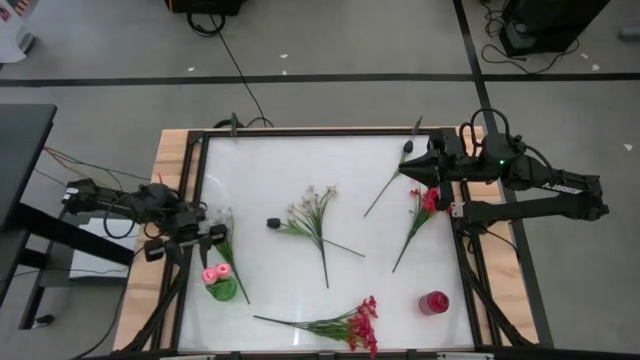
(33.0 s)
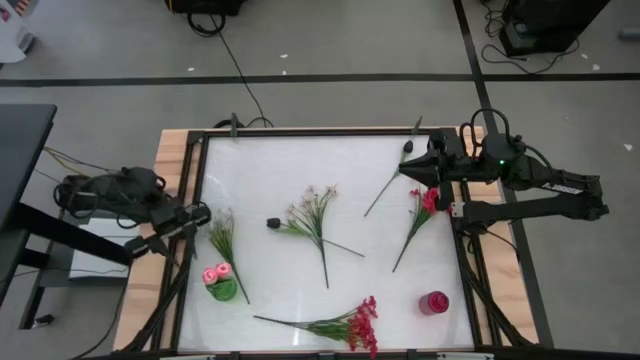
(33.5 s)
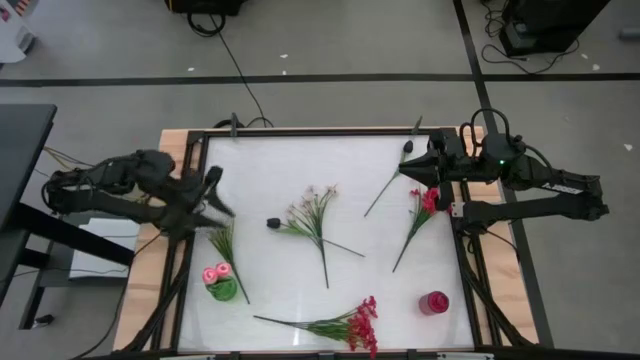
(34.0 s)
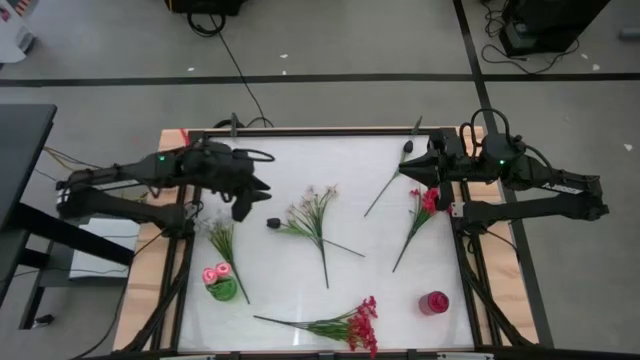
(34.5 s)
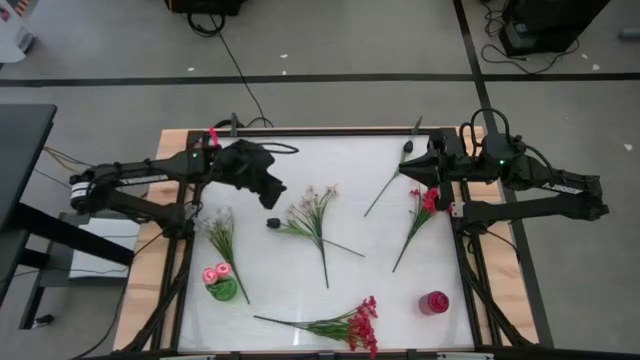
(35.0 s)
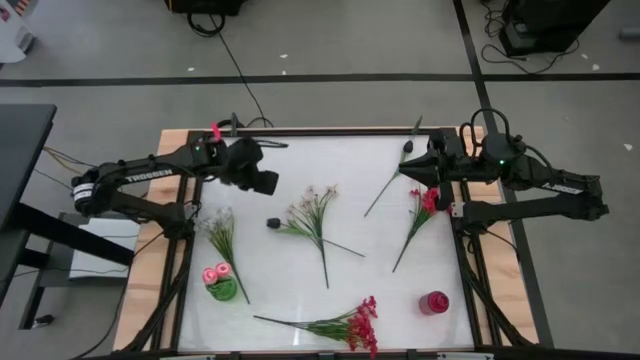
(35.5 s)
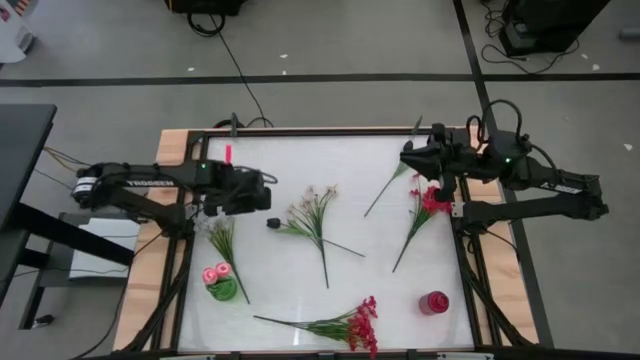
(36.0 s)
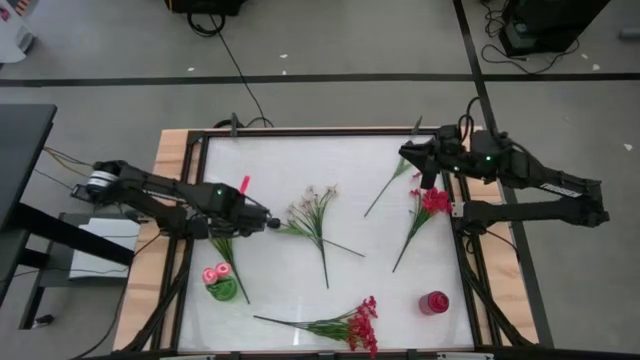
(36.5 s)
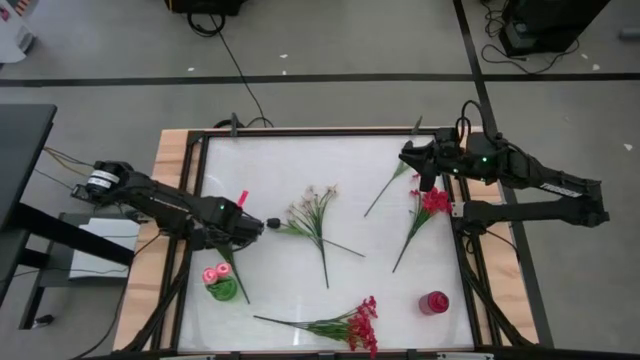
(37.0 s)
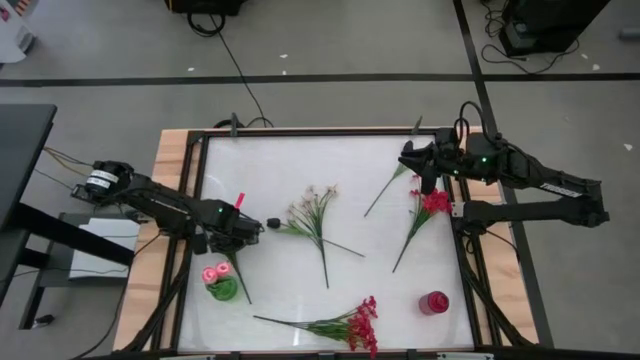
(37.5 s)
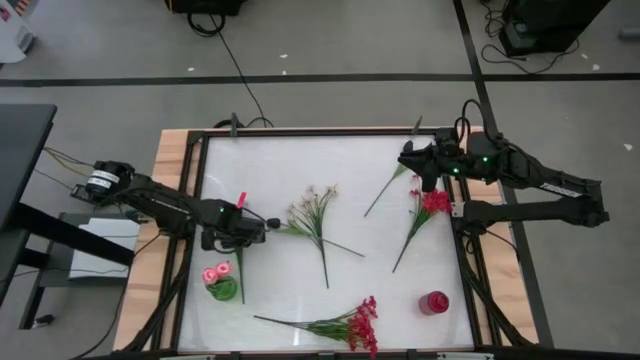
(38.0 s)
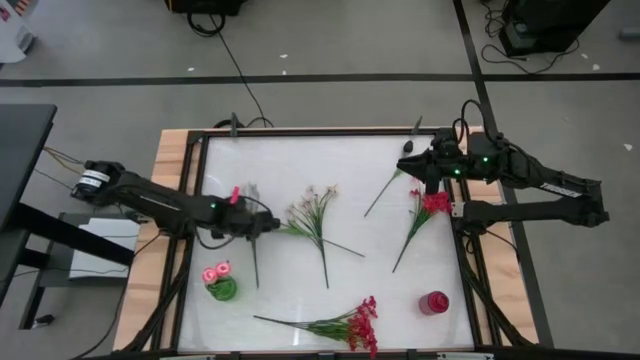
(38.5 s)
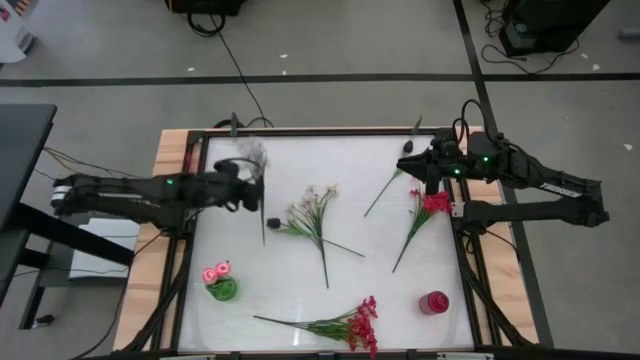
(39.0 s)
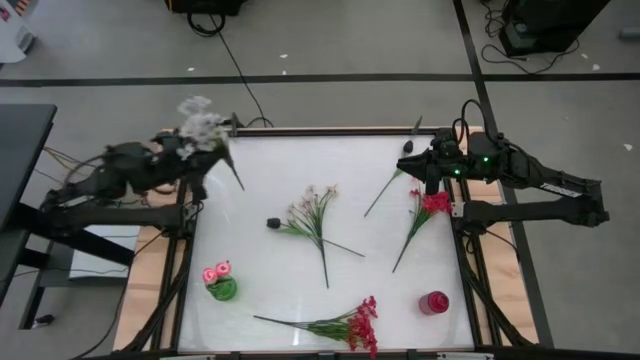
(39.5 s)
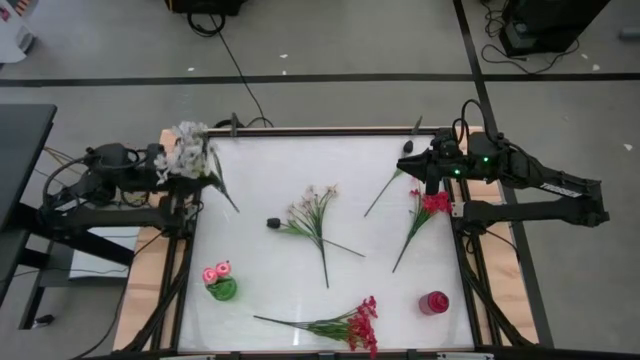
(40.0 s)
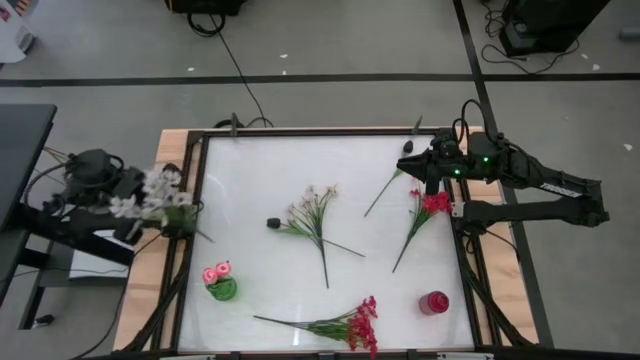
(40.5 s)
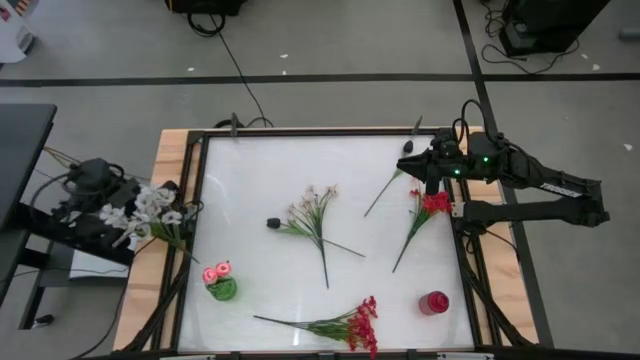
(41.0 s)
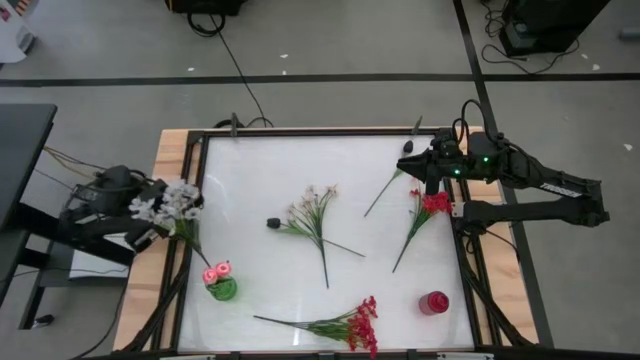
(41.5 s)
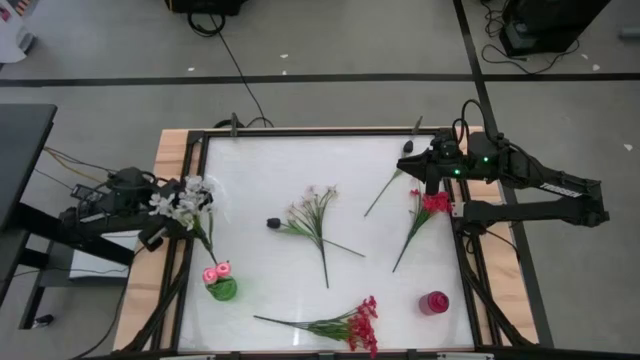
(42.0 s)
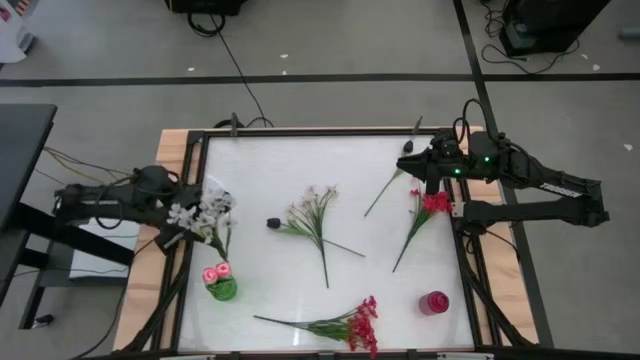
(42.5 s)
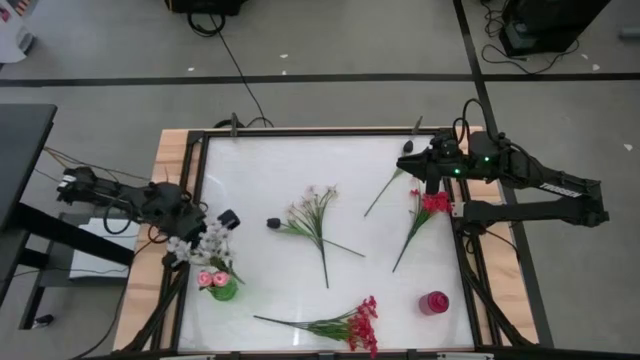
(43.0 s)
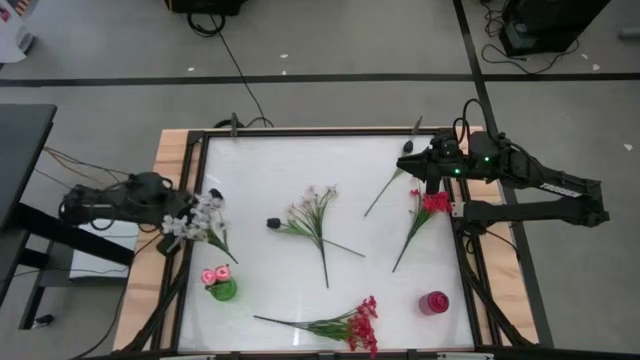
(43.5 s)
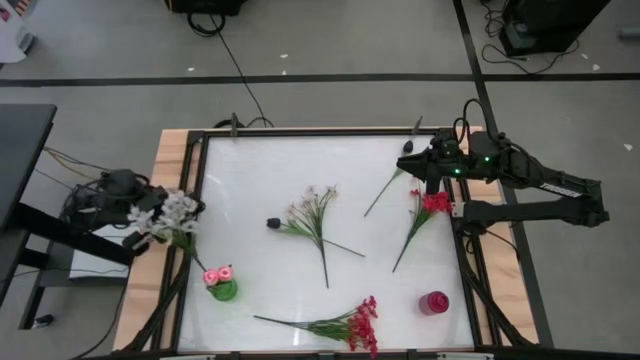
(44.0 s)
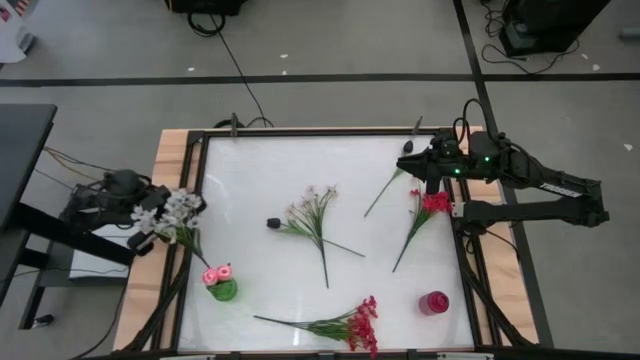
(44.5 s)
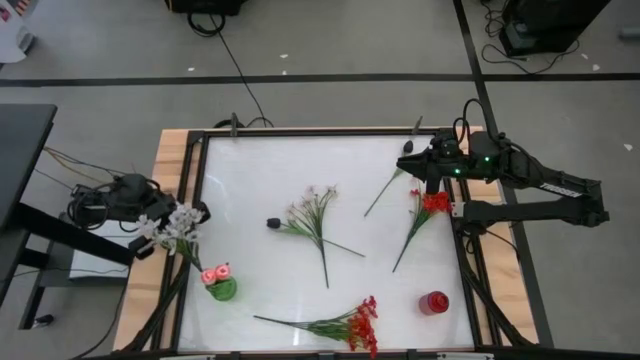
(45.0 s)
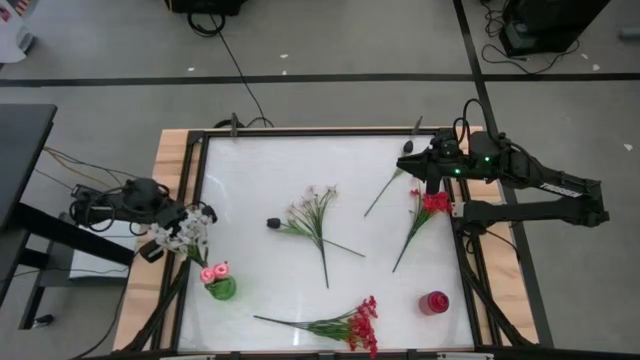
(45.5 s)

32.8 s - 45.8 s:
Task: Sort flowers into vase by color
Put the left white flowers into the green vase

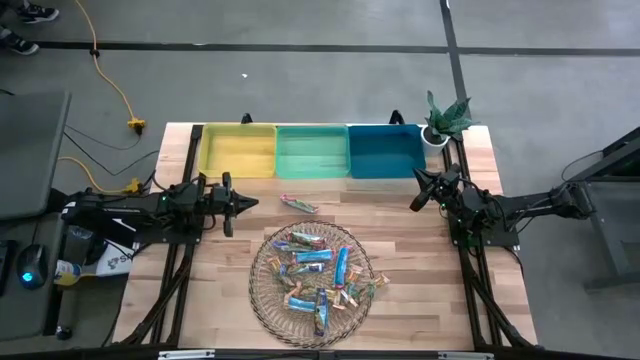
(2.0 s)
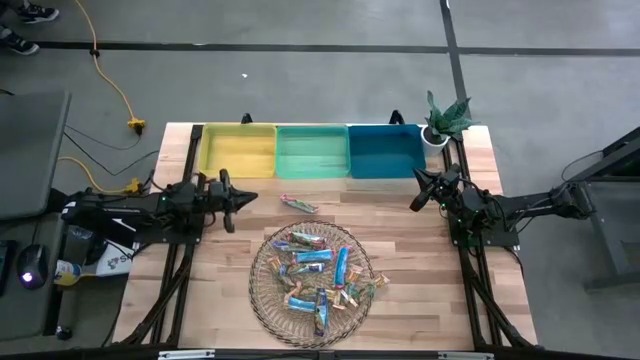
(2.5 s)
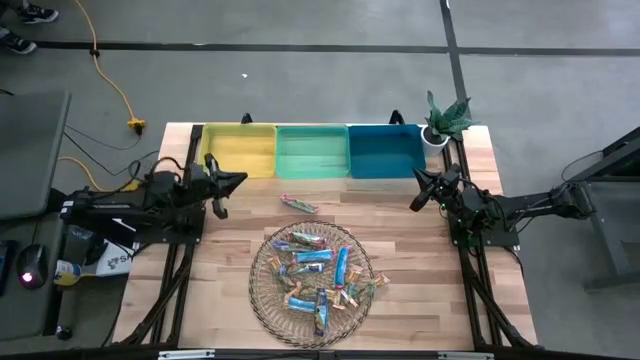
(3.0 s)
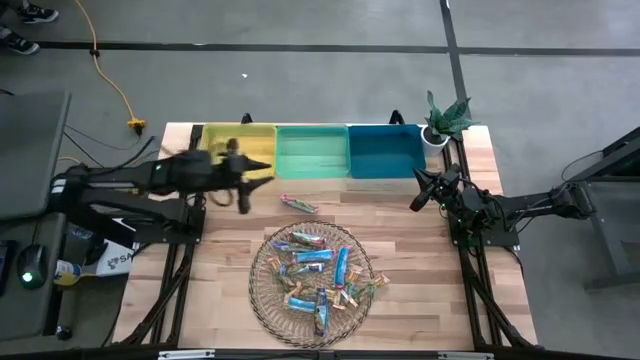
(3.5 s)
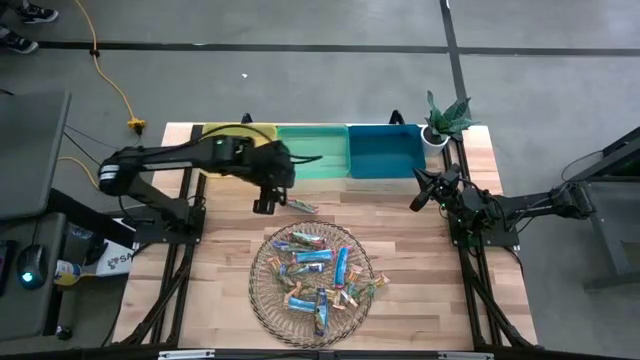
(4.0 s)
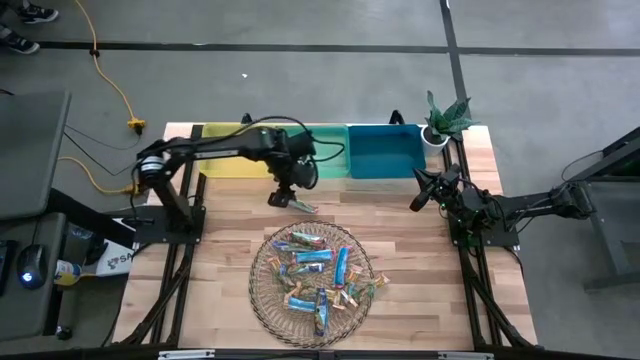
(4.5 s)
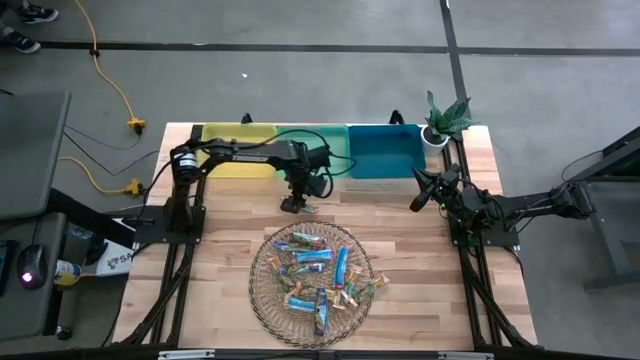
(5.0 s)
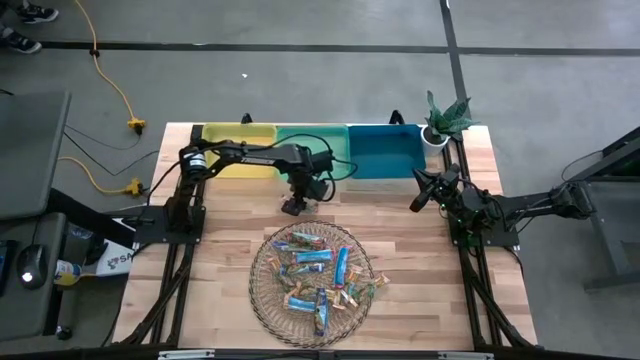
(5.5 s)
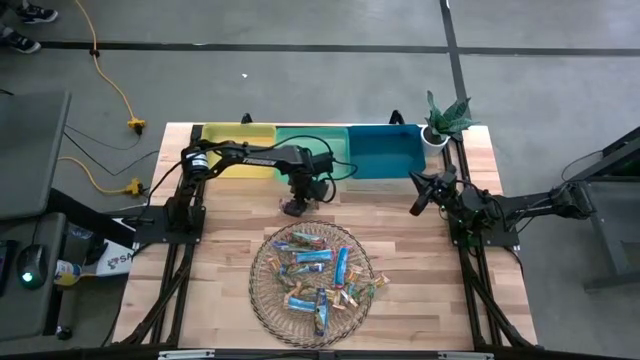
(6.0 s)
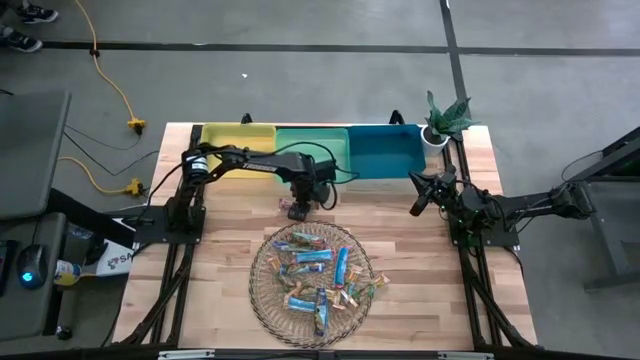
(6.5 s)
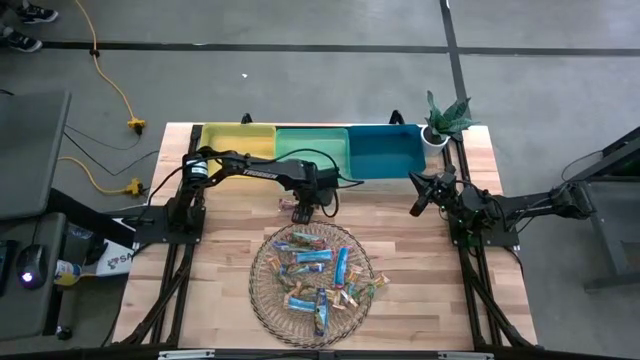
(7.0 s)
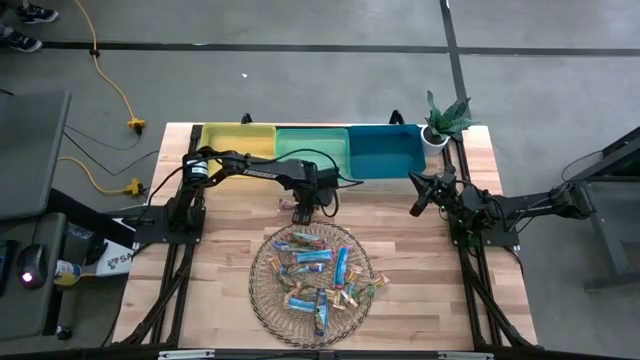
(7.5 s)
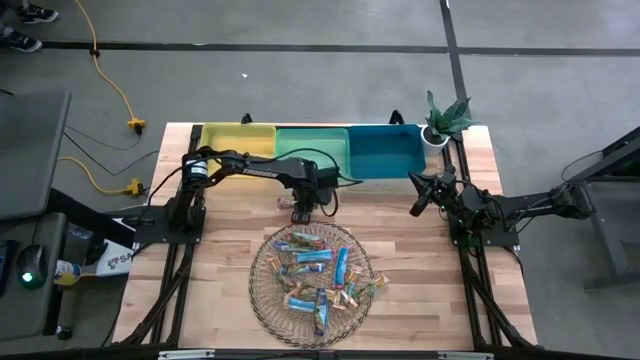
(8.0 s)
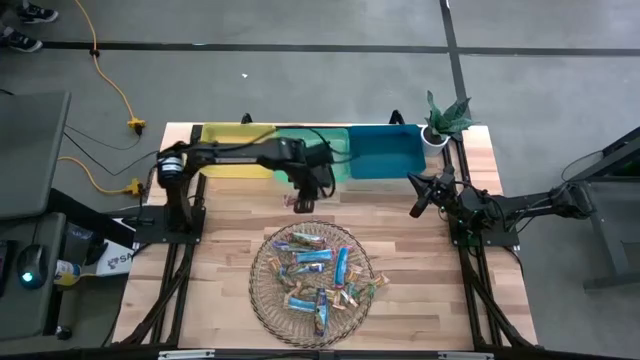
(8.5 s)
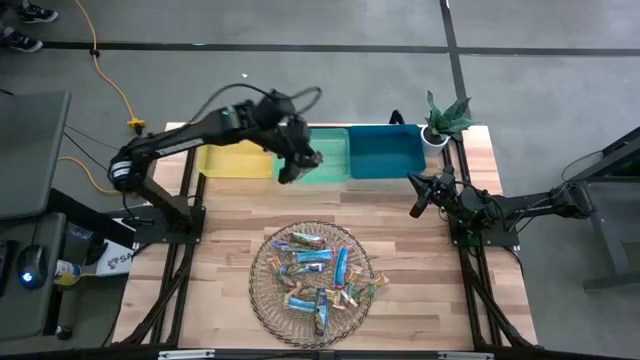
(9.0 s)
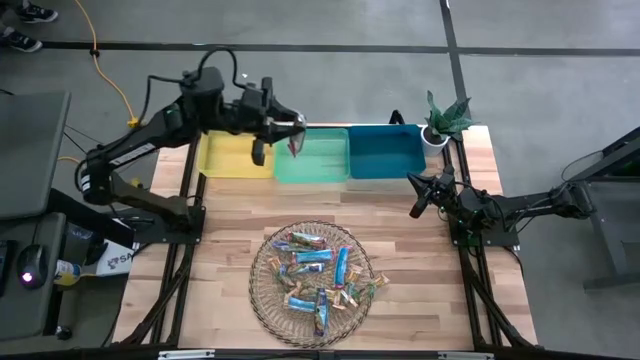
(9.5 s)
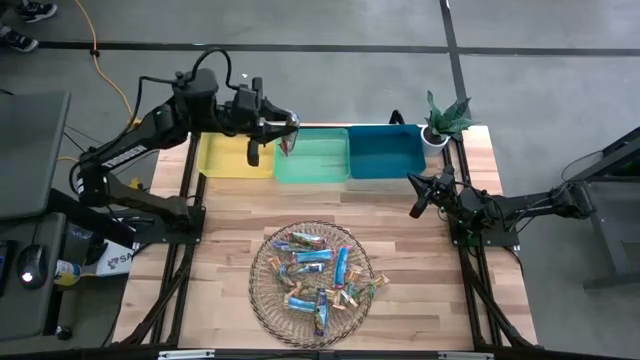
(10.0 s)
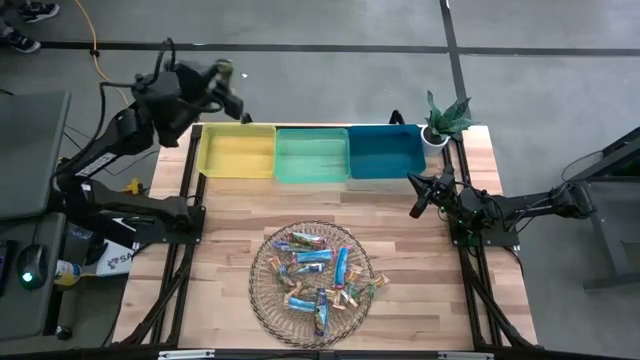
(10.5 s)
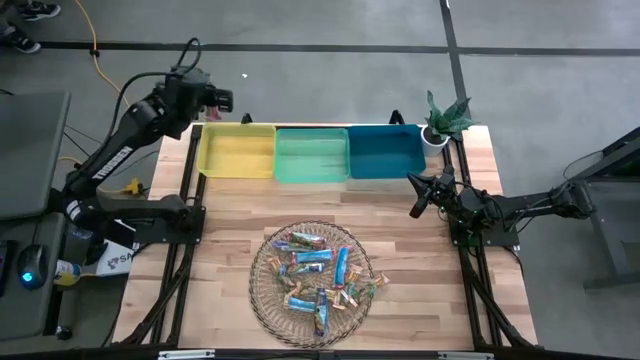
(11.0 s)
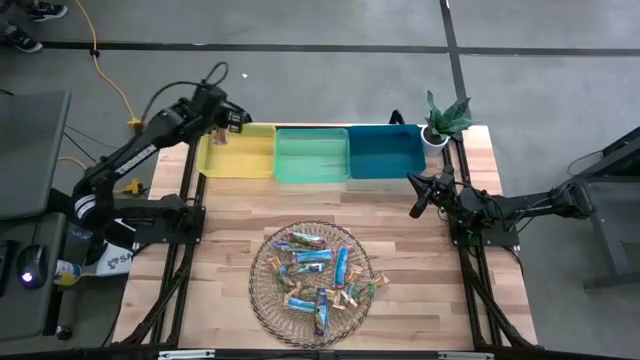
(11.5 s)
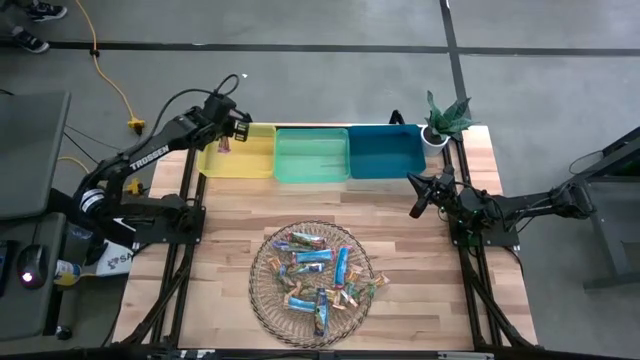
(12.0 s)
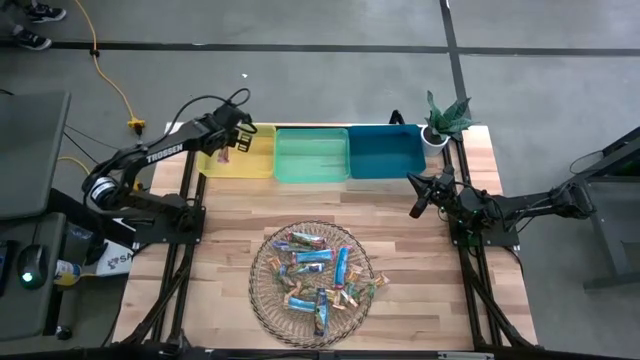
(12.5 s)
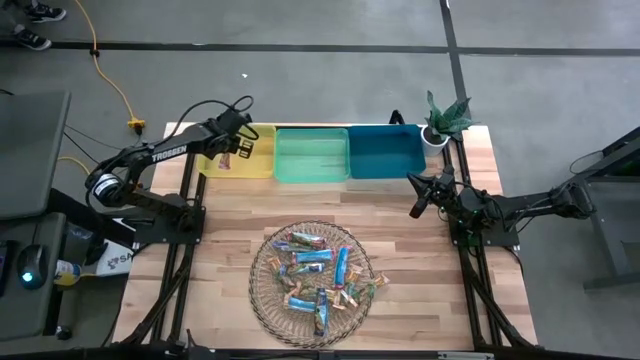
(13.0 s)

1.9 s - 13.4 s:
Task: Pick and place Granola Bars by type
Put the red granola bar into the yellow bin
